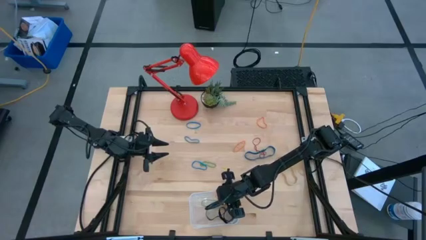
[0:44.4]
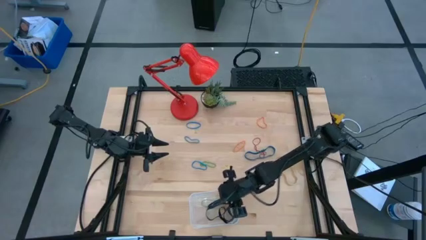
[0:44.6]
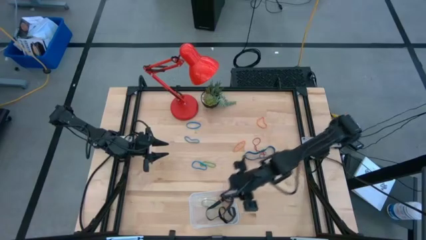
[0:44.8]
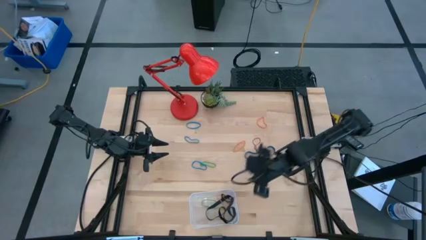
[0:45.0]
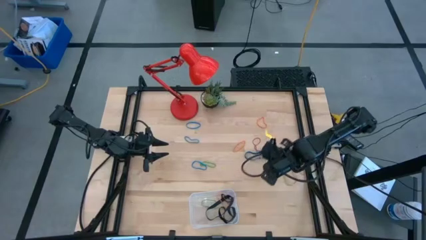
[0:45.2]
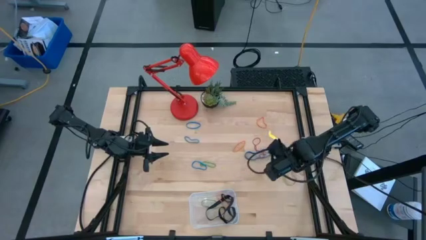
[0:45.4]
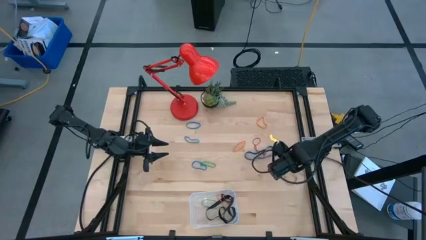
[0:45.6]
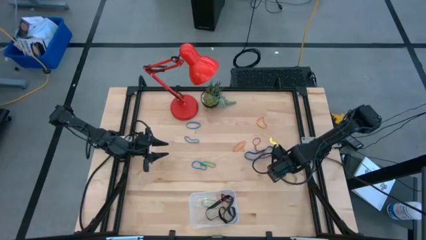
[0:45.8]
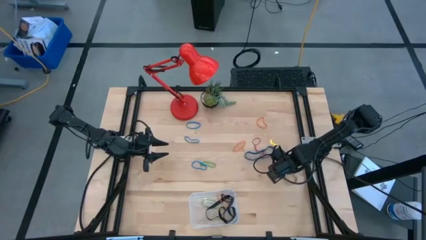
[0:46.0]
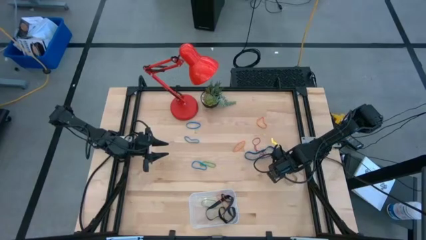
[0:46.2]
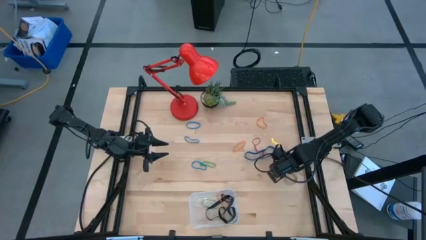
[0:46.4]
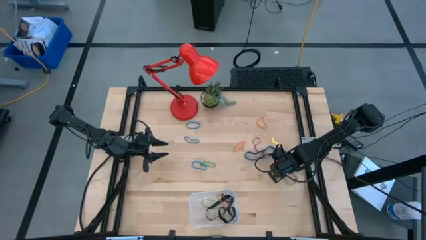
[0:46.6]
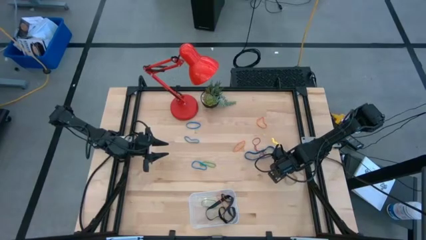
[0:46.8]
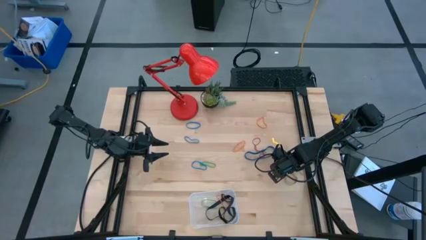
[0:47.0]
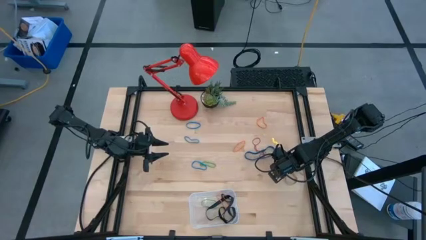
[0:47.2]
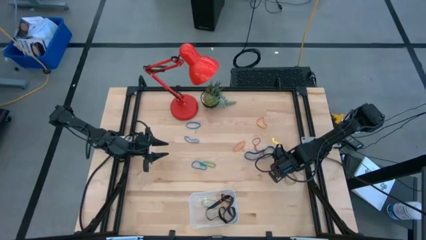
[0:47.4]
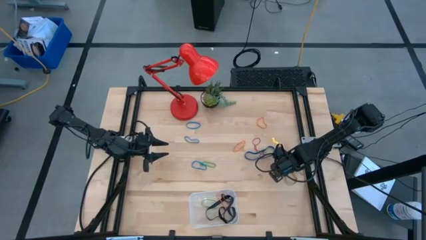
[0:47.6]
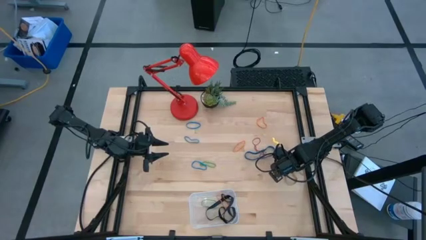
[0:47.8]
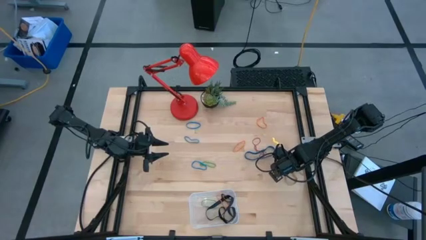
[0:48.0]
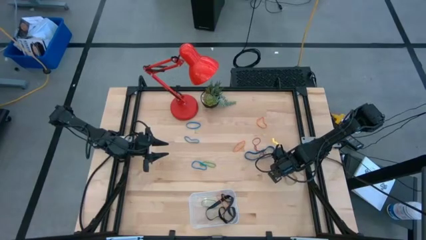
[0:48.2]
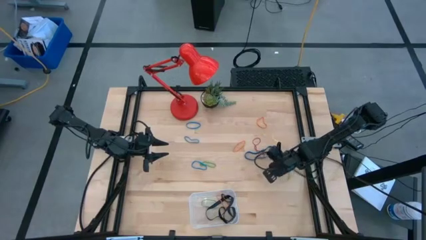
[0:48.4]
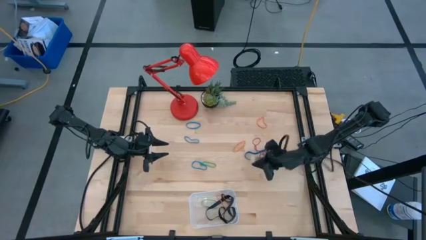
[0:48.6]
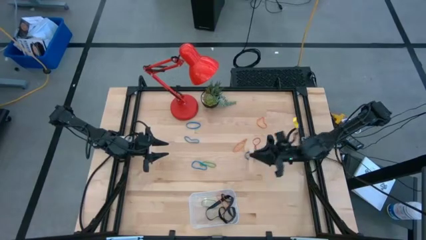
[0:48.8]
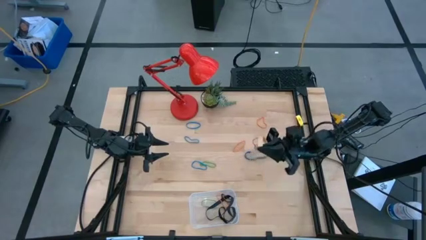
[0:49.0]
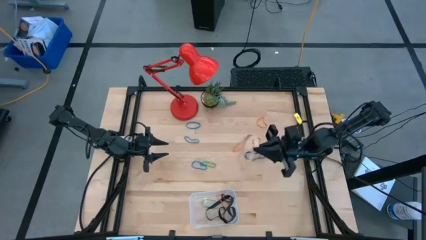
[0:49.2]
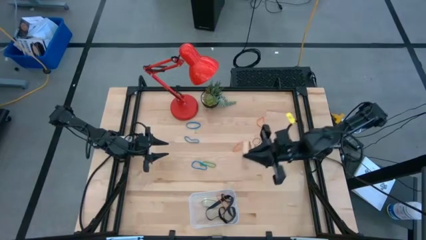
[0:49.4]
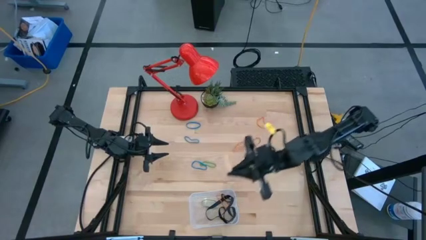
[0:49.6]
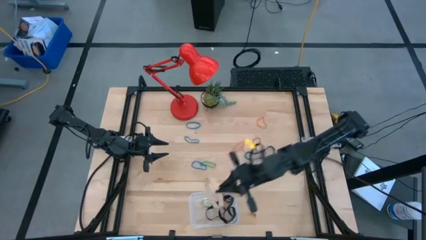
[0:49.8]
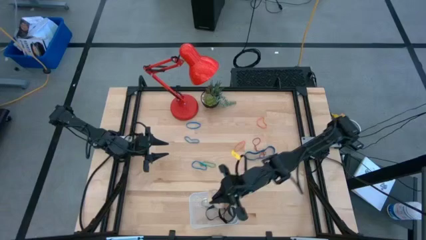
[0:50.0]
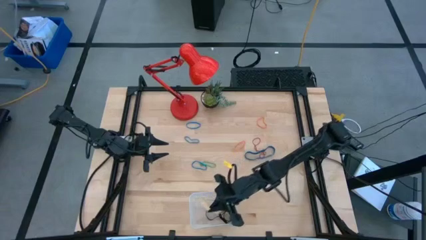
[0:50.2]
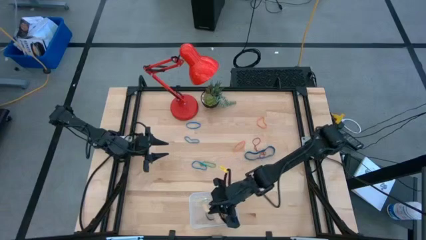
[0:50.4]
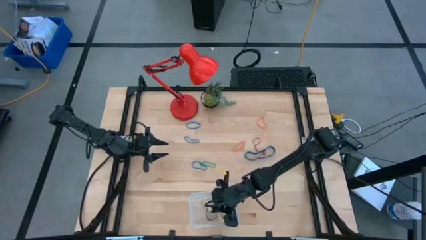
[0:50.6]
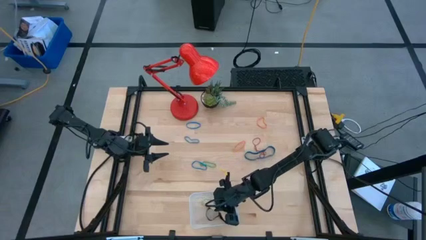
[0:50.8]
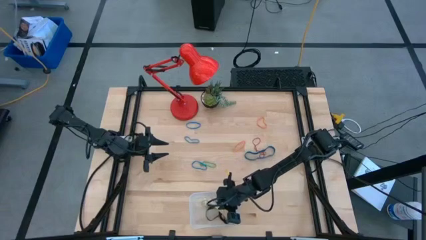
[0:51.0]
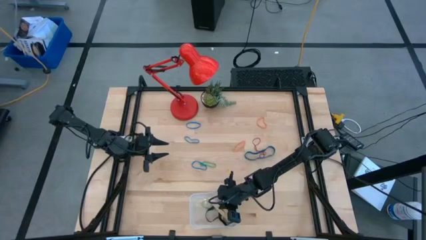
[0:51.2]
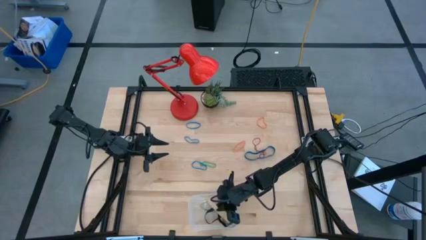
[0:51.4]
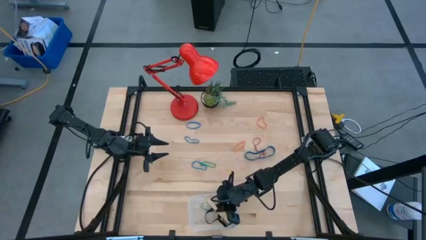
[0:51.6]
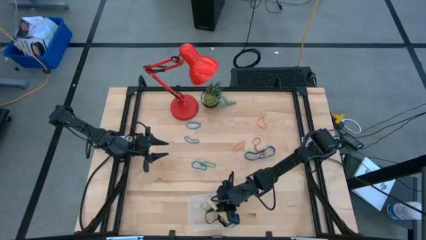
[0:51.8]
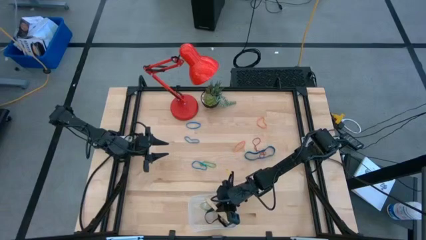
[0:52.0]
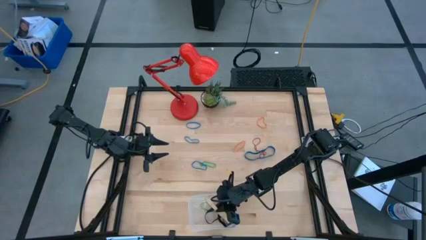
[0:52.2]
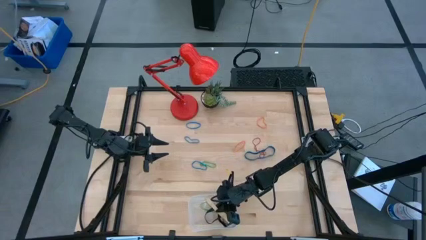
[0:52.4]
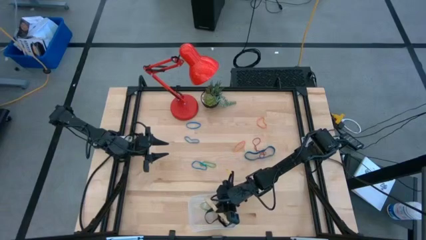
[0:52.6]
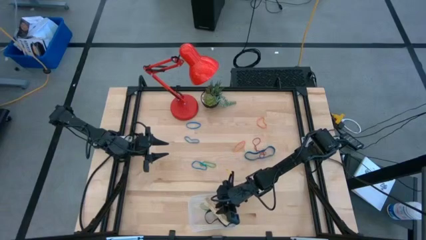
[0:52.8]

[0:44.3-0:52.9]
Task: Pick and place rubber bands into bin
Put the brown rubber band into the transparent bin

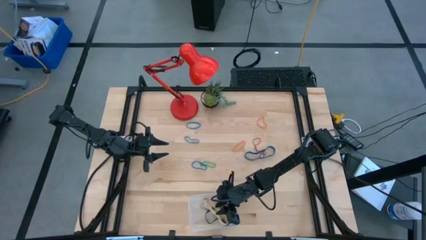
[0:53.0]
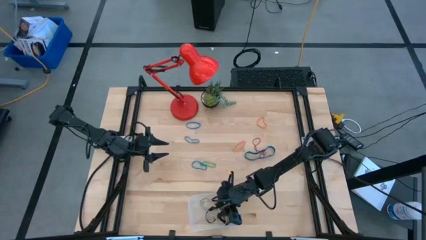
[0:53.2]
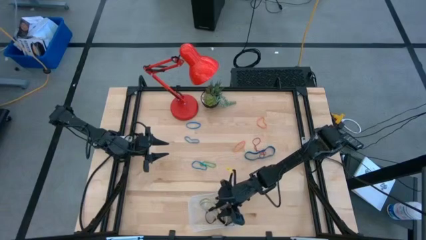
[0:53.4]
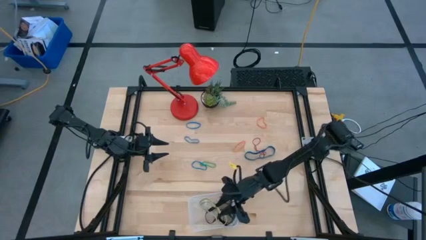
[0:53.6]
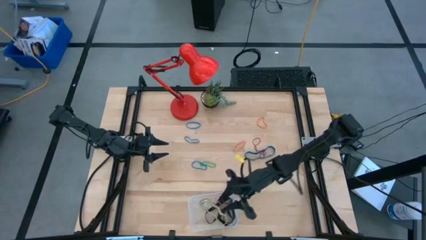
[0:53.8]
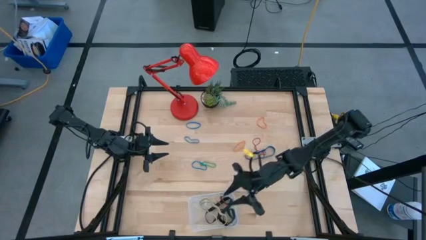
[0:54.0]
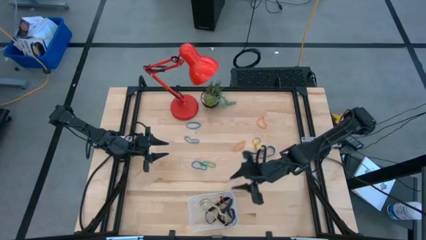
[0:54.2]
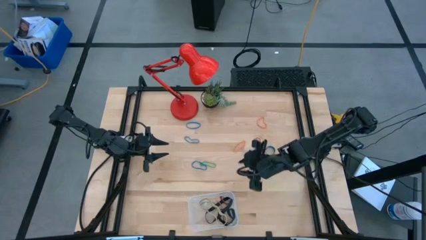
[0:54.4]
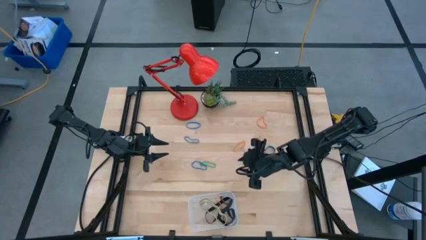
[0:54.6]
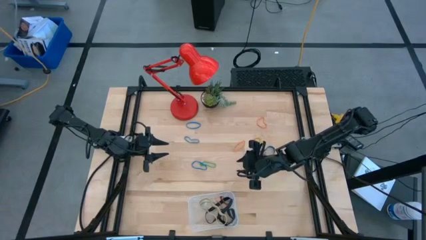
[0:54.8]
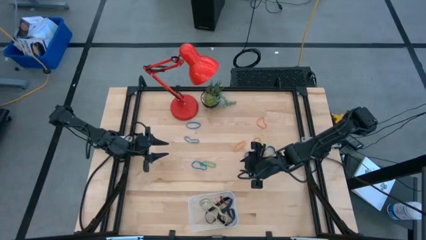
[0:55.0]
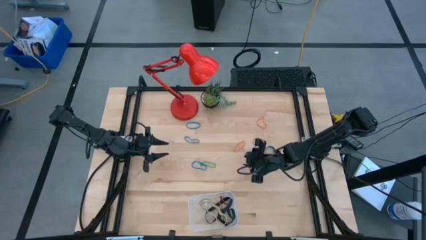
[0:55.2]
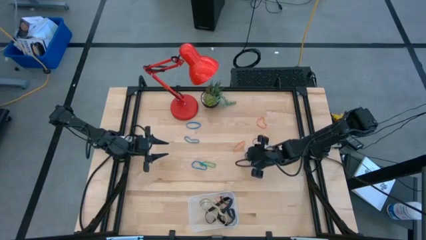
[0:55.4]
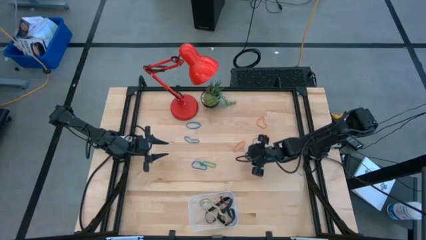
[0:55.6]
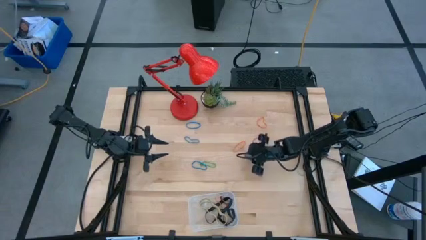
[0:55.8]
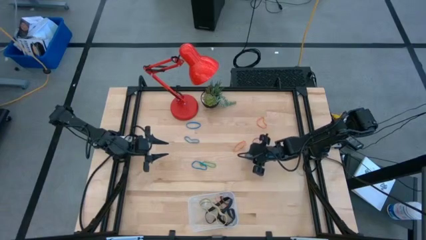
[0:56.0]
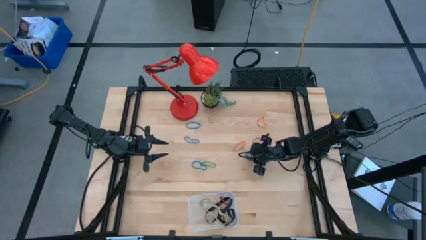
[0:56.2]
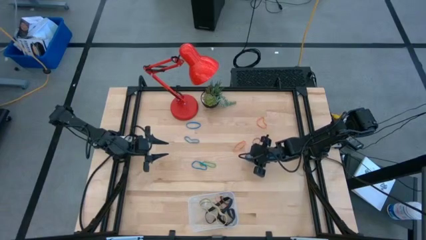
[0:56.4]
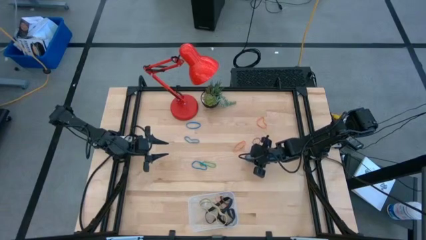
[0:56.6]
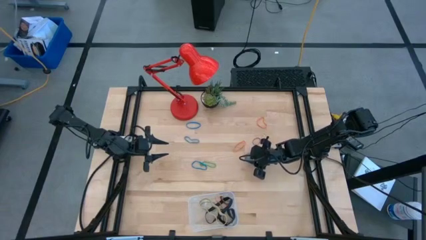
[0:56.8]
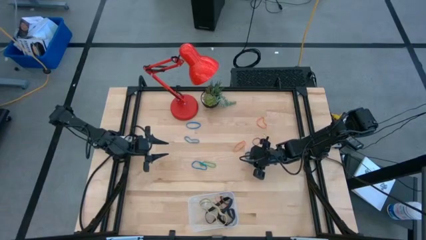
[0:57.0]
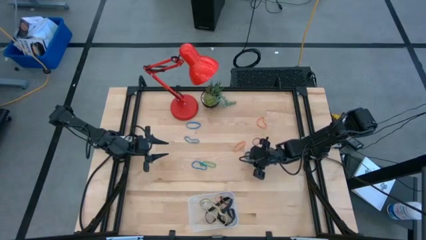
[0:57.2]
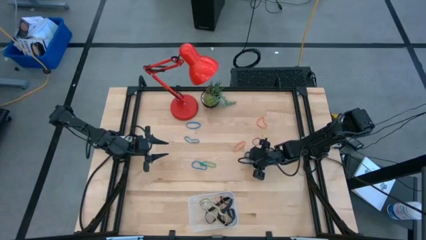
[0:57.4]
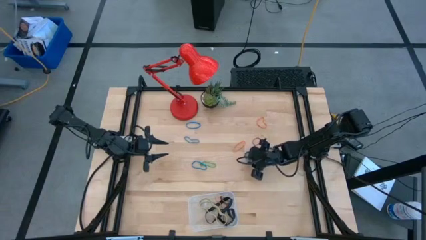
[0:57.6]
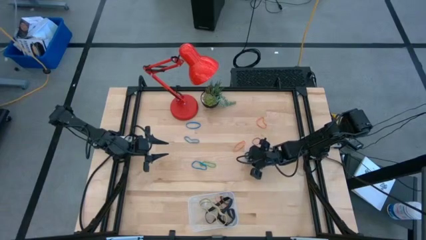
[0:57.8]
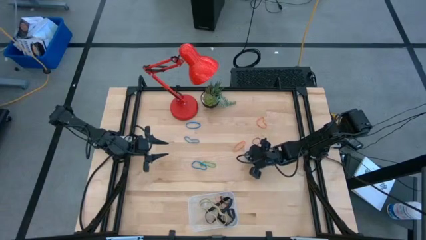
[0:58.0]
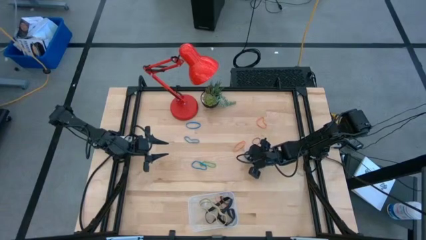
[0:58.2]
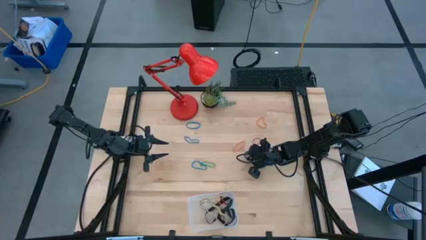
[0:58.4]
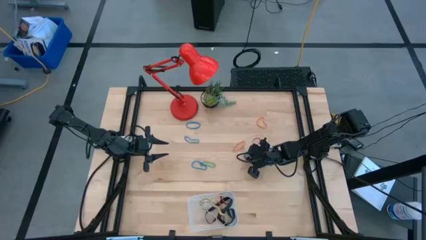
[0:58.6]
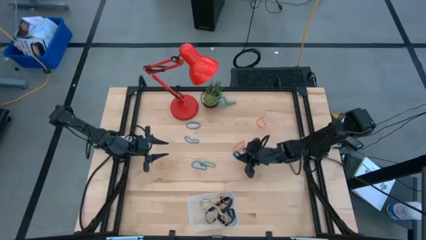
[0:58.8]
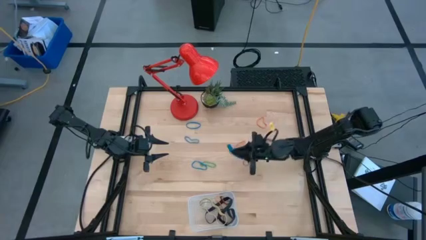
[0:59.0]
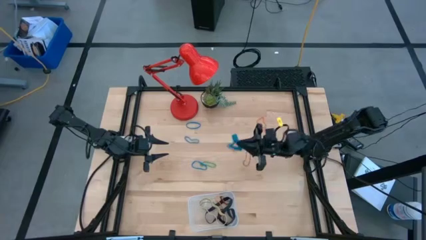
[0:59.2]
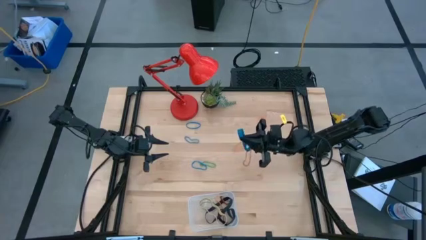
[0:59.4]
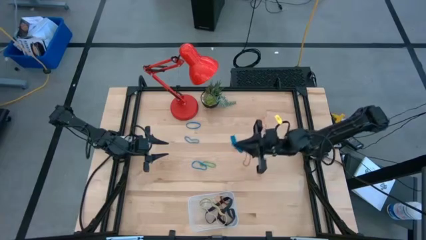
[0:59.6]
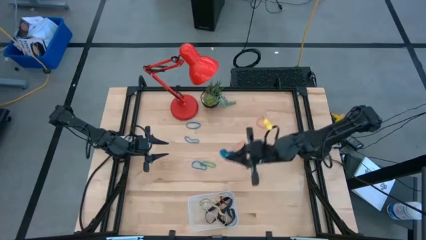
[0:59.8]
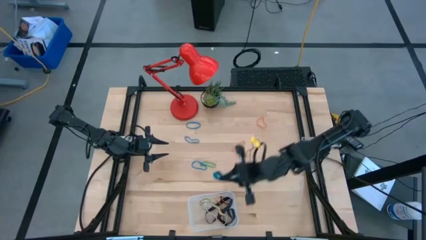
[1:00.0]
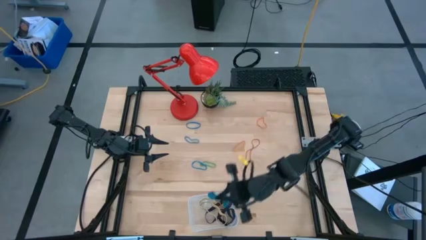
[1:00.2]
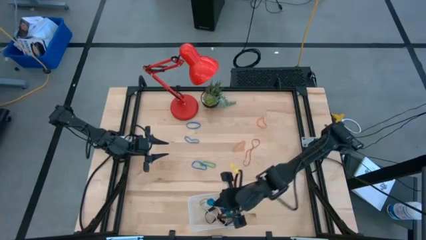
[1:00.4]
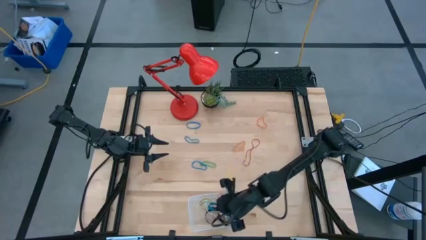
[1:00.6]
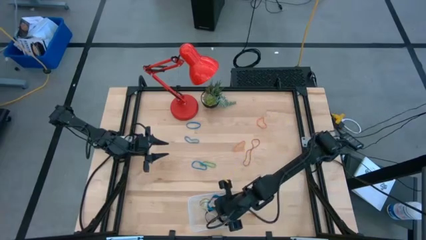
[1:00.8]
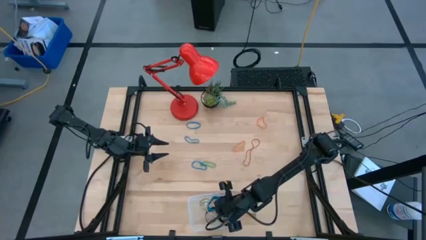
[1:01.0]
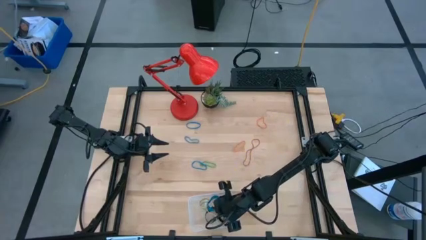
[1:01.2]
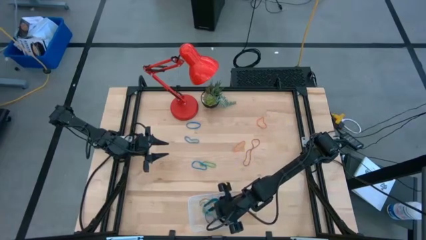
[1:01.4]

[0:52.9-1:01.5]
Put the blue rubber band into the transparent bin
